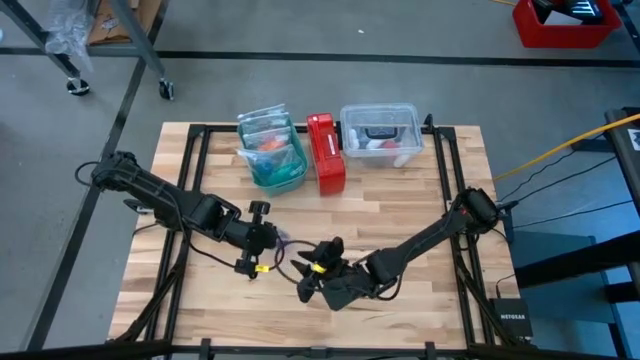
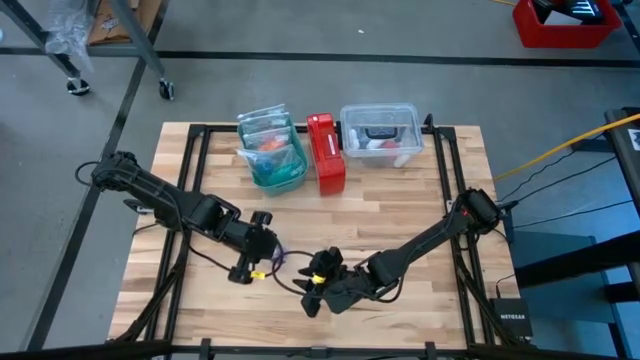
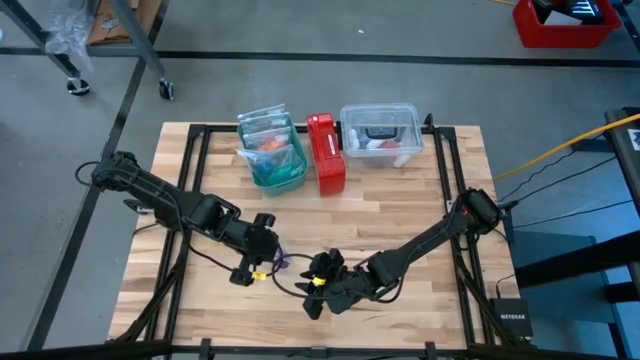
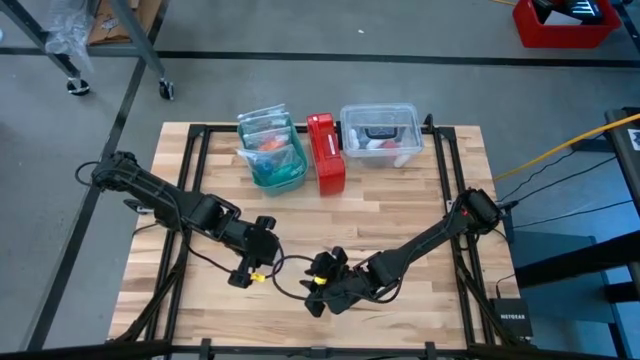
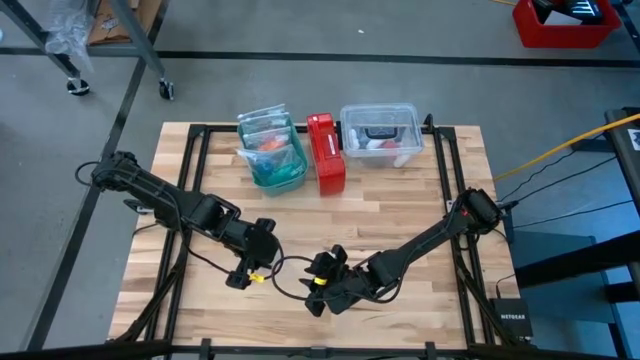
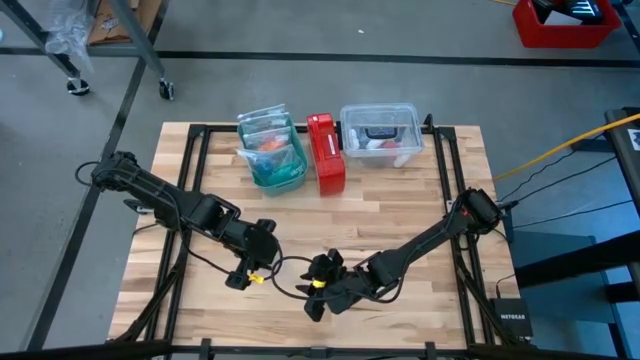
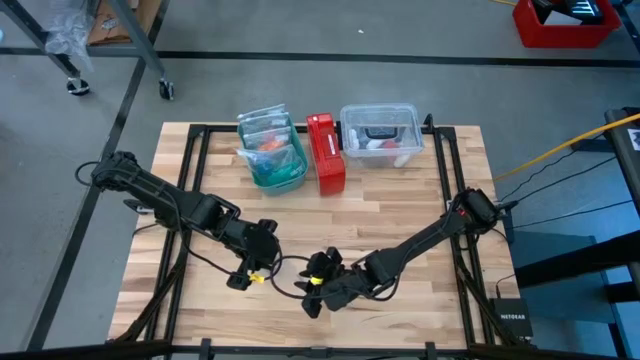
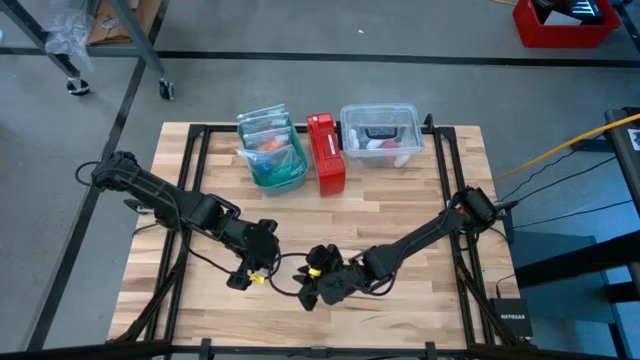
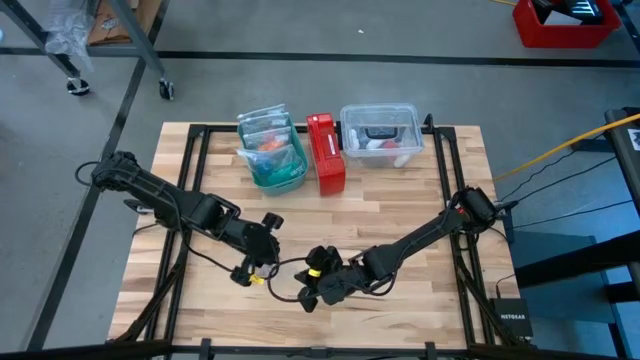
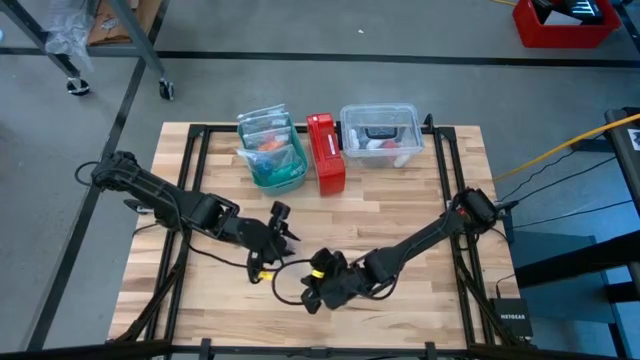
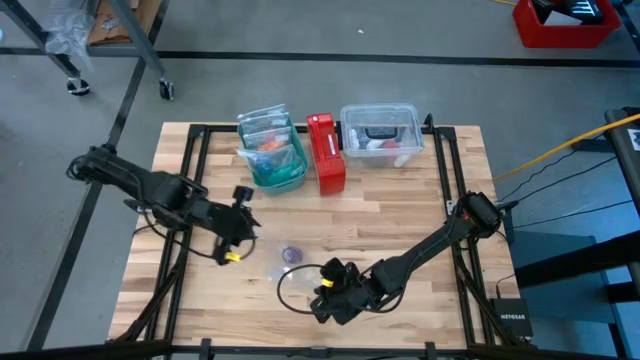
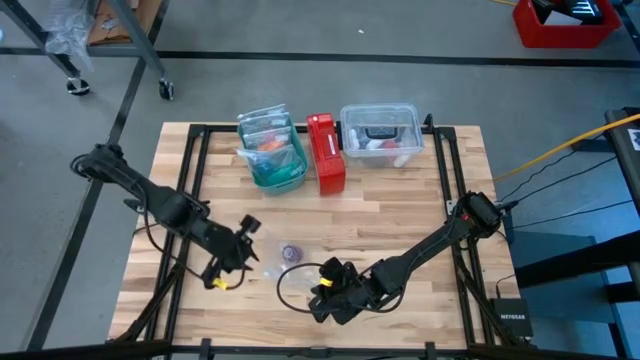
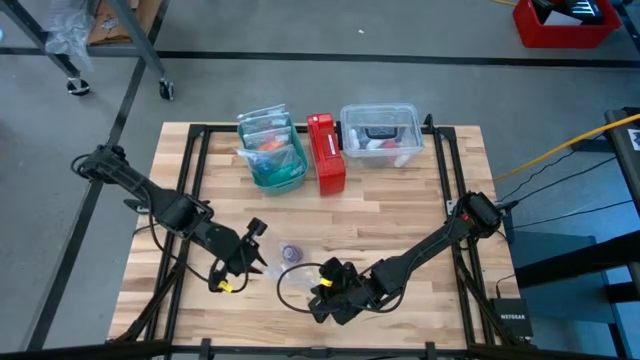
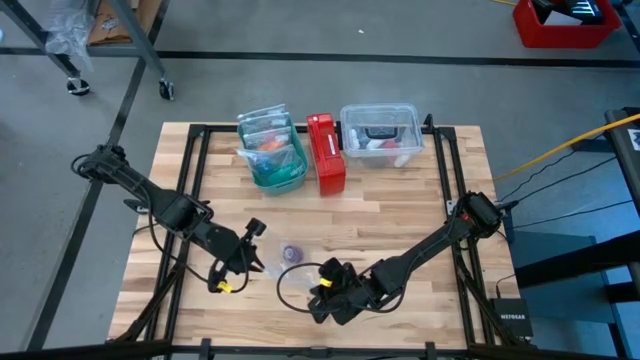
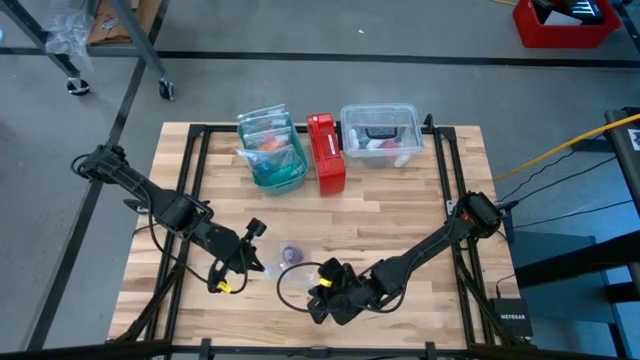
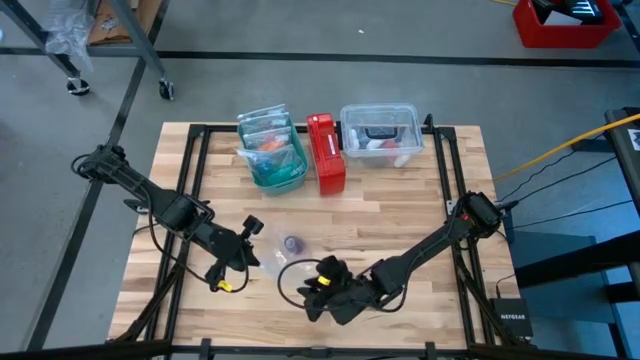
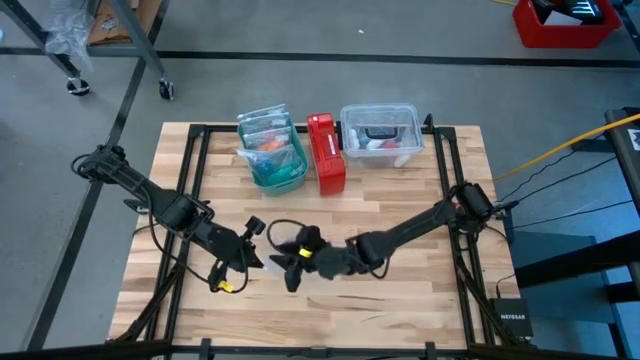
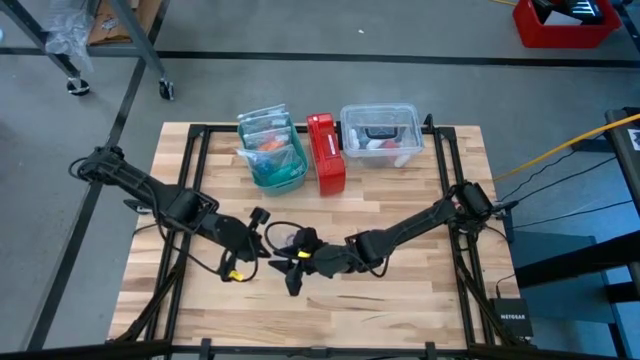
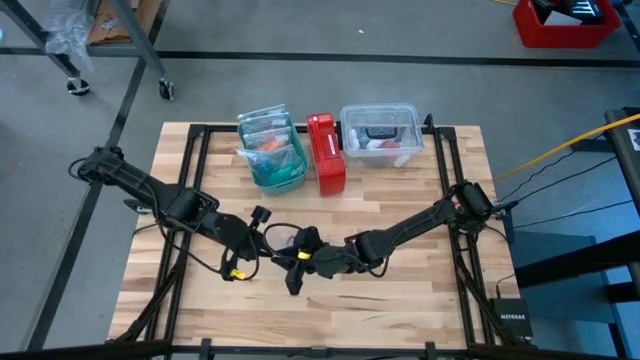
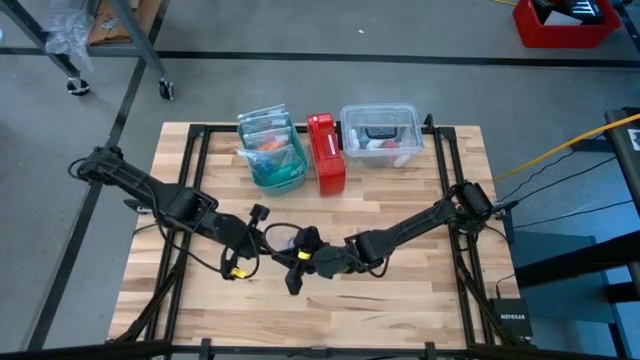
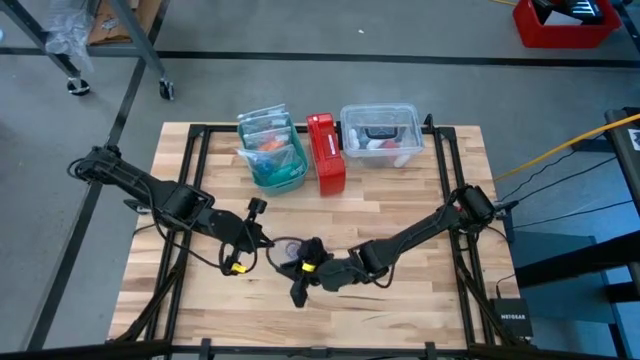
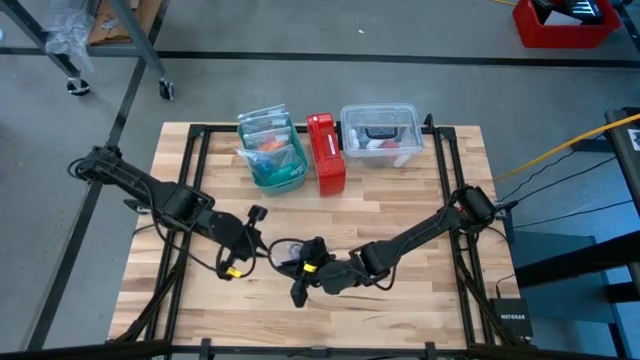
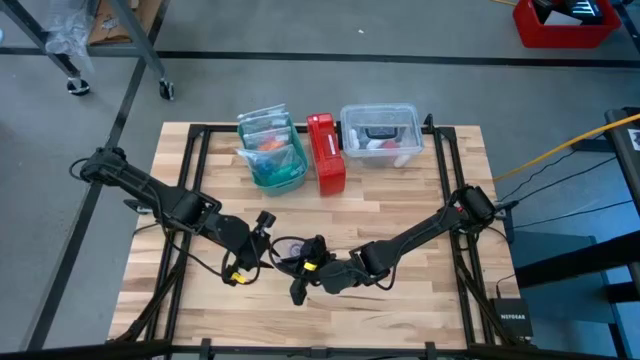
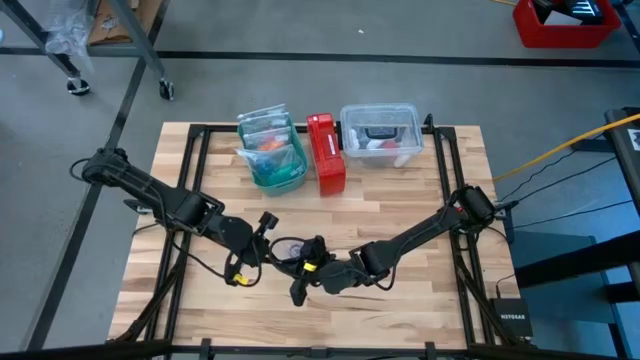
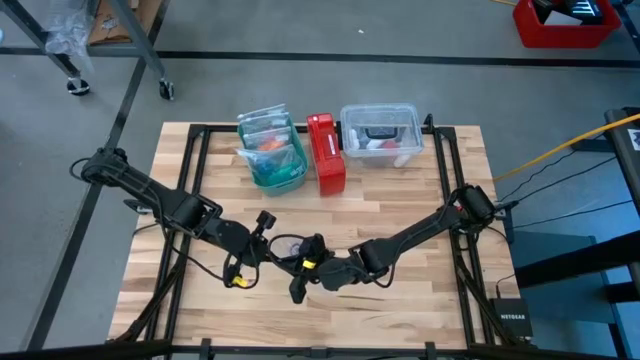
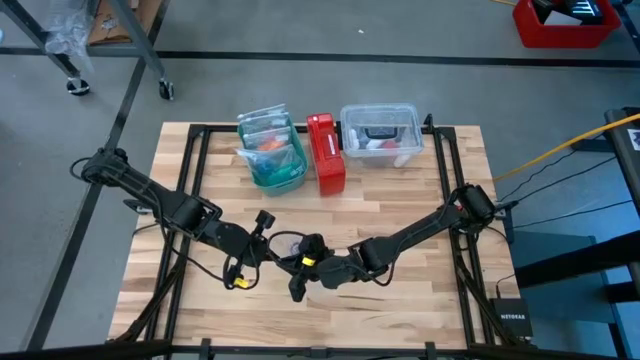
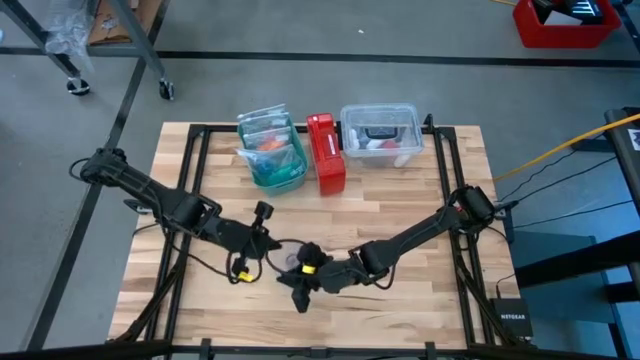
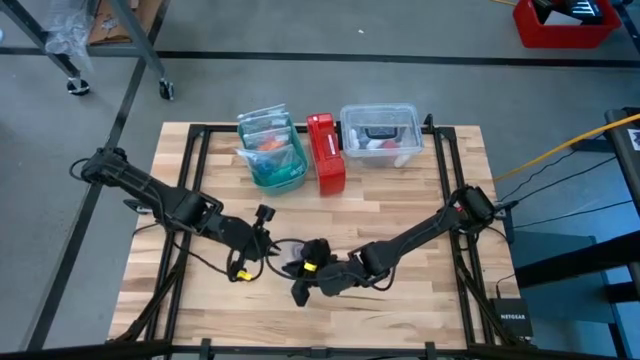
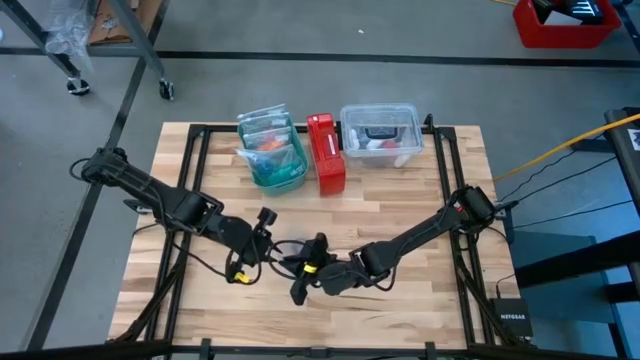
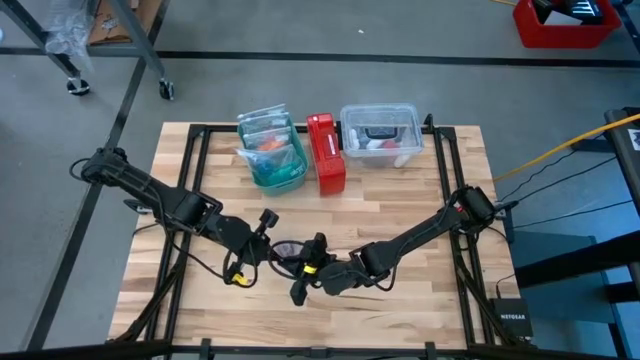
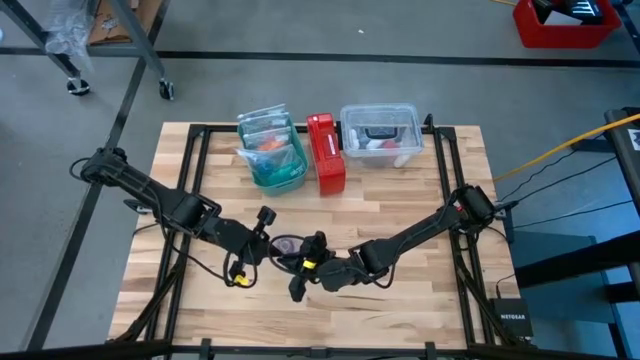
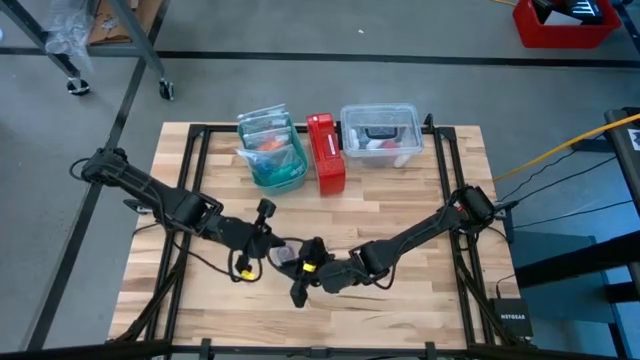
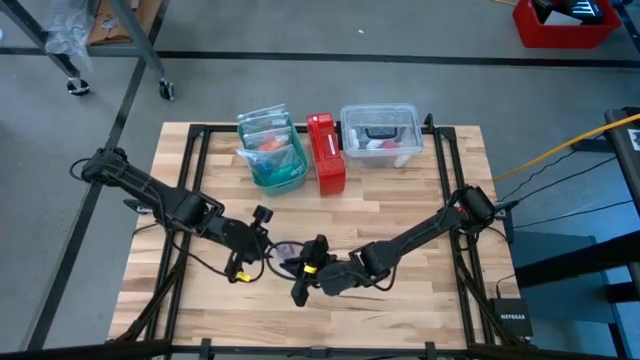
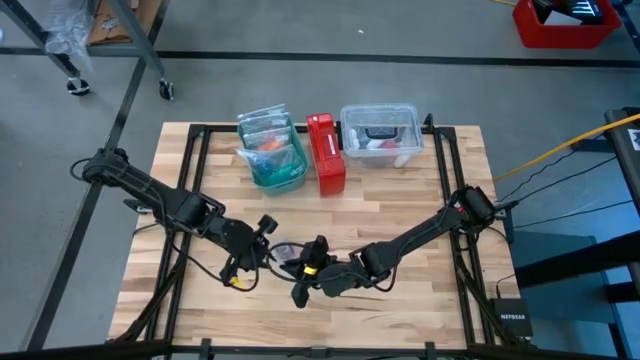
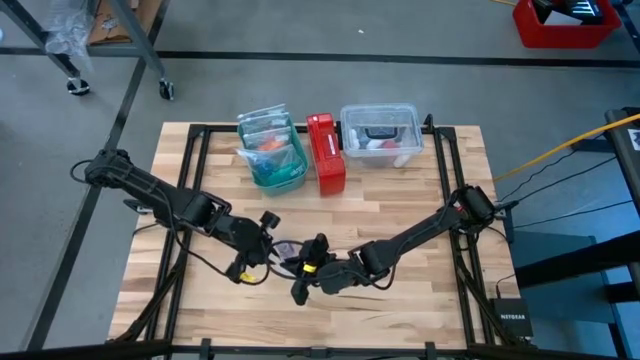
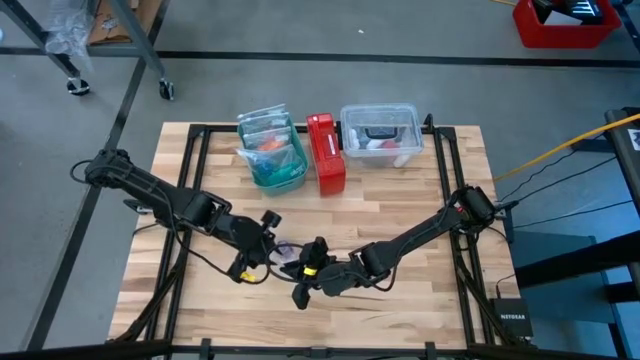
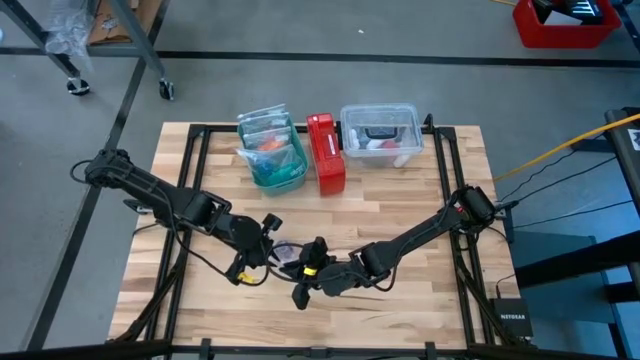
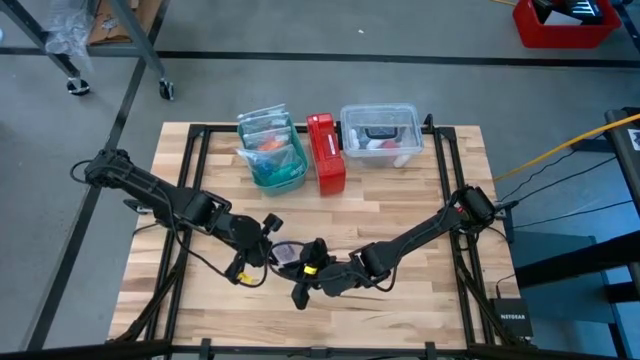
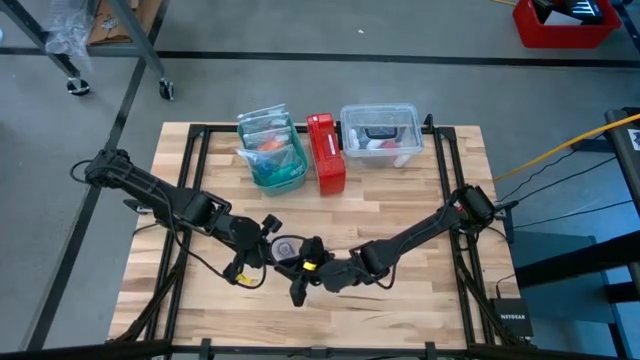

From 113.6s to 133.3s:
Task: Roll bandage
Close the transparent zip bag

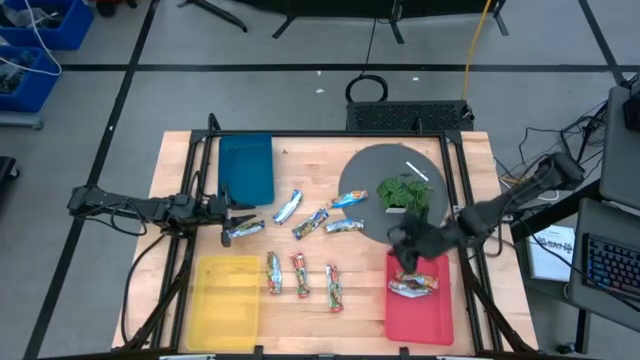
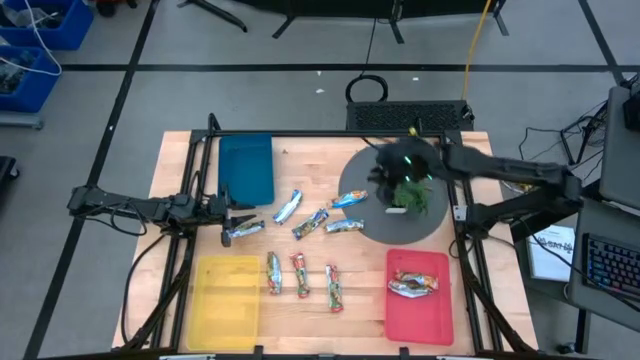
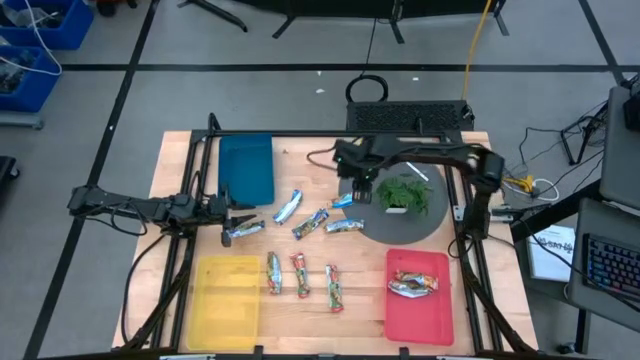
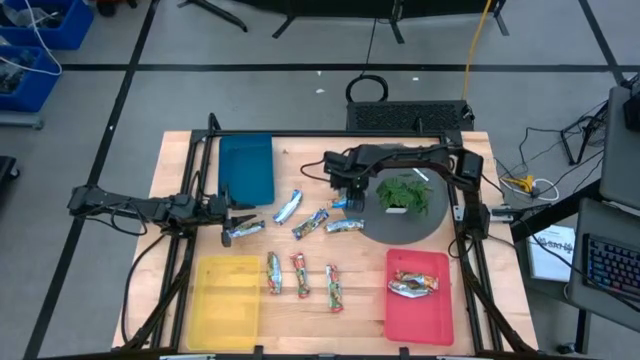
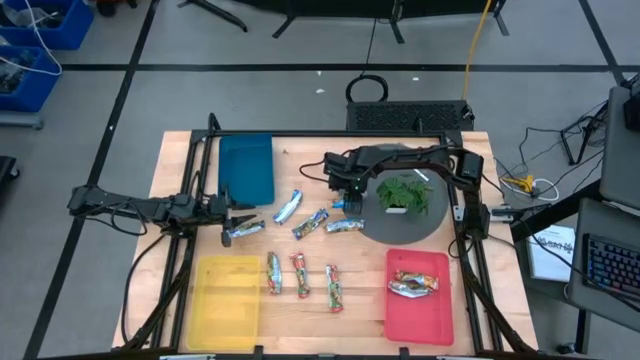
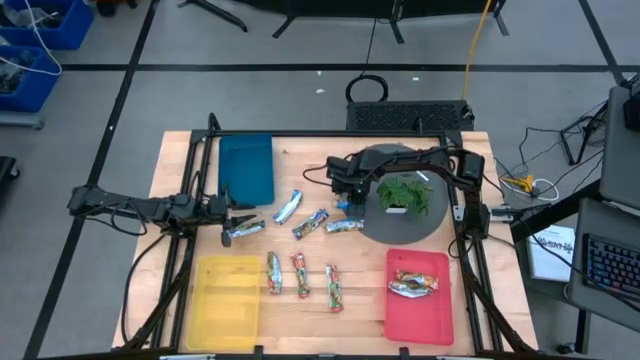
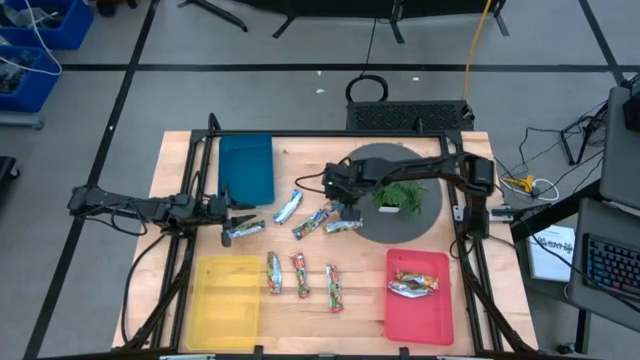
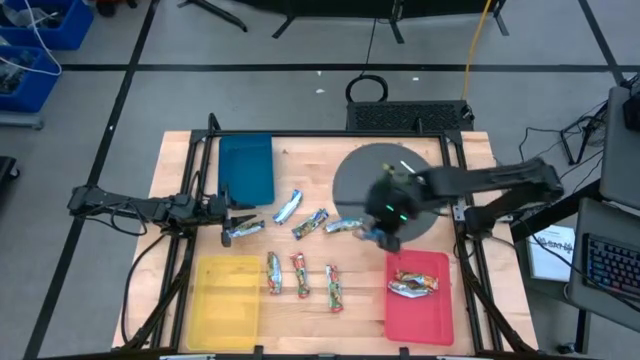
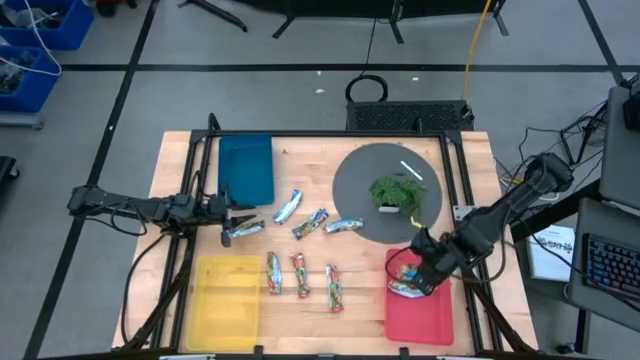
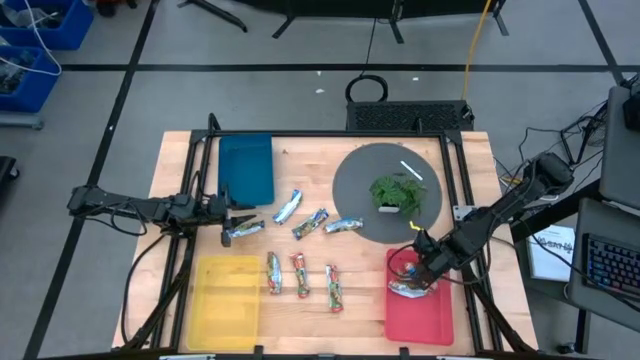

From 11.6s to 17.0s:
Task: Pick and place Granola Bars by type
Put the yellow granola bar into the pink bin
